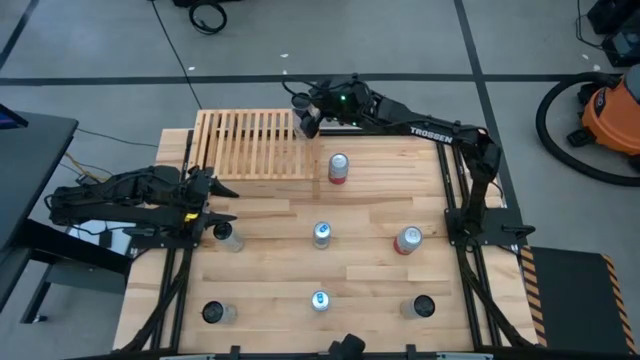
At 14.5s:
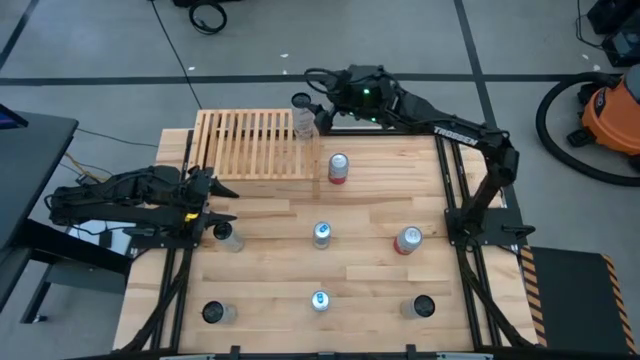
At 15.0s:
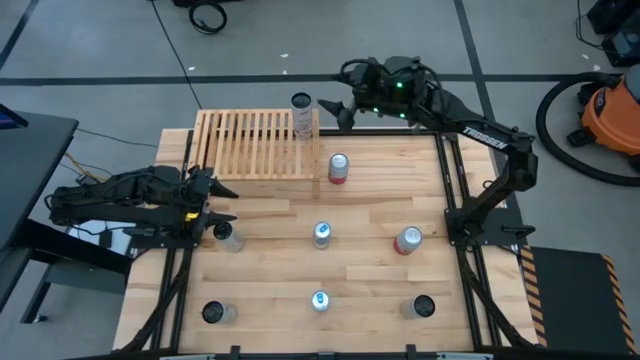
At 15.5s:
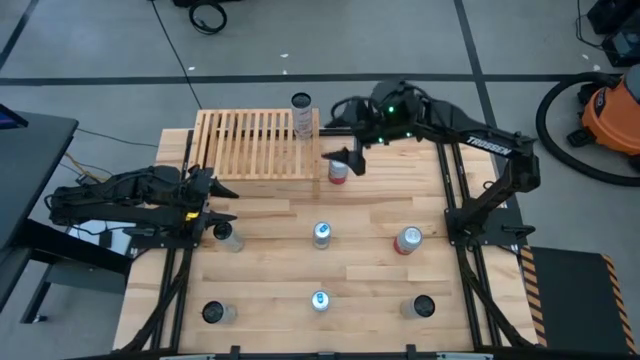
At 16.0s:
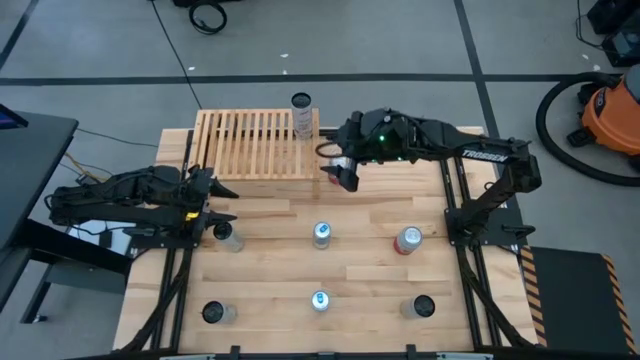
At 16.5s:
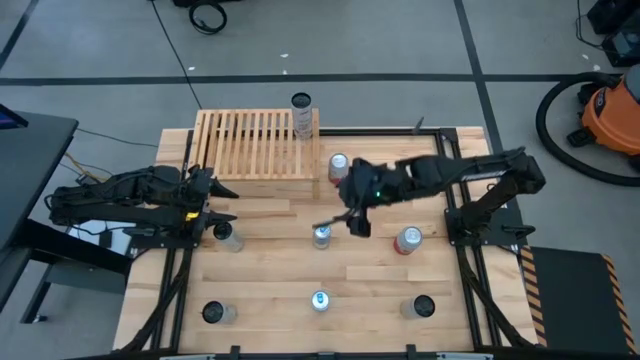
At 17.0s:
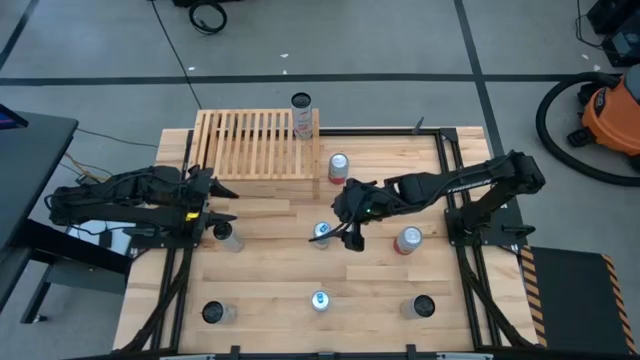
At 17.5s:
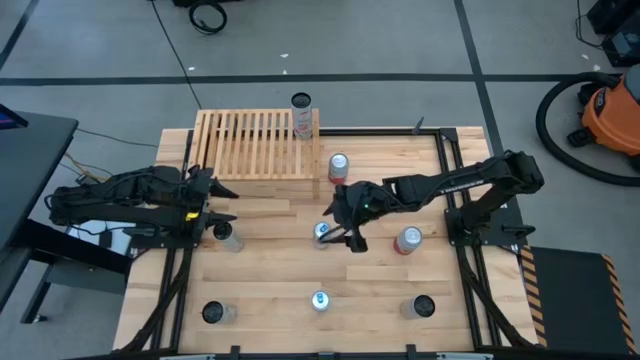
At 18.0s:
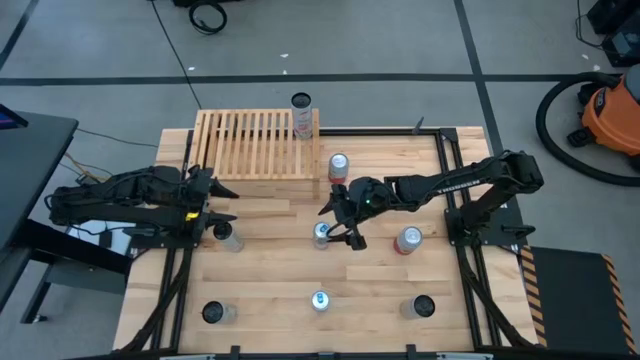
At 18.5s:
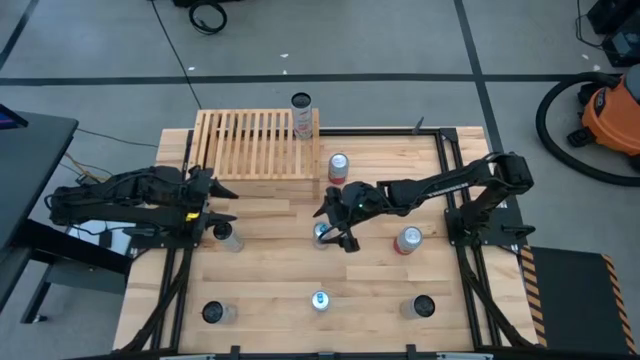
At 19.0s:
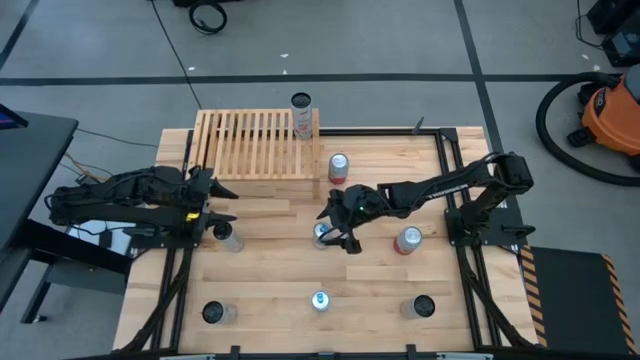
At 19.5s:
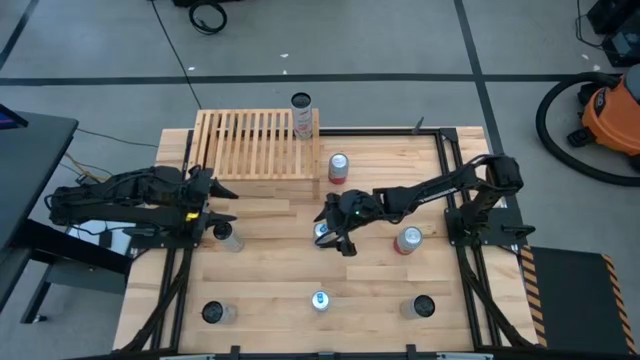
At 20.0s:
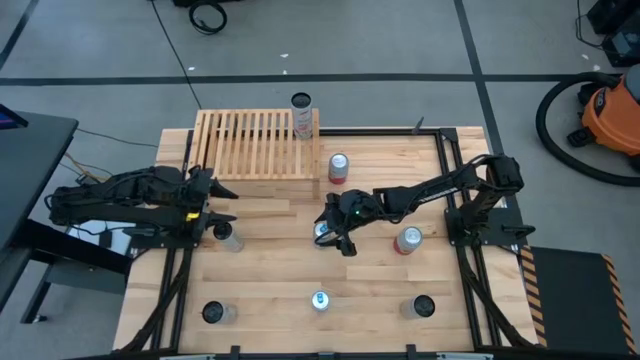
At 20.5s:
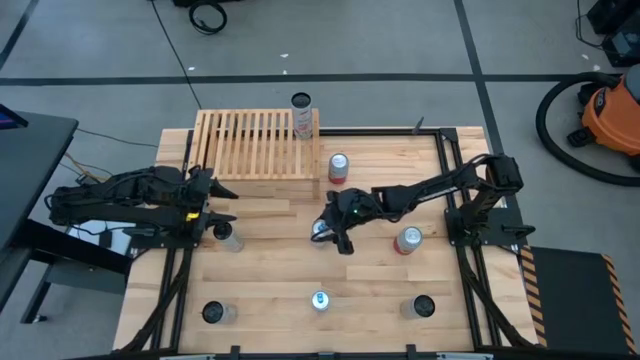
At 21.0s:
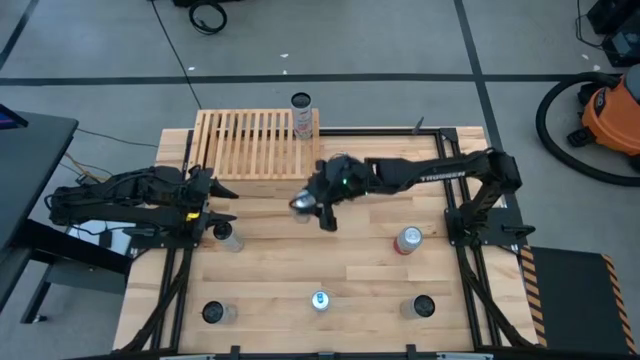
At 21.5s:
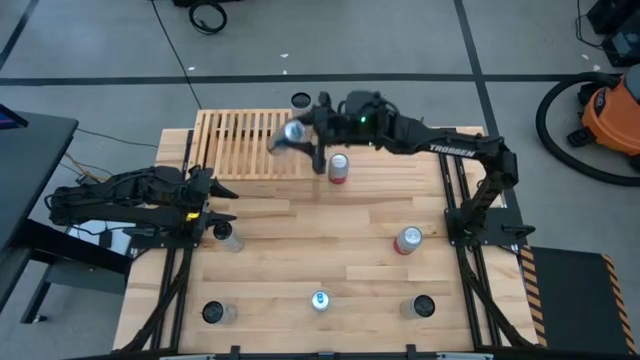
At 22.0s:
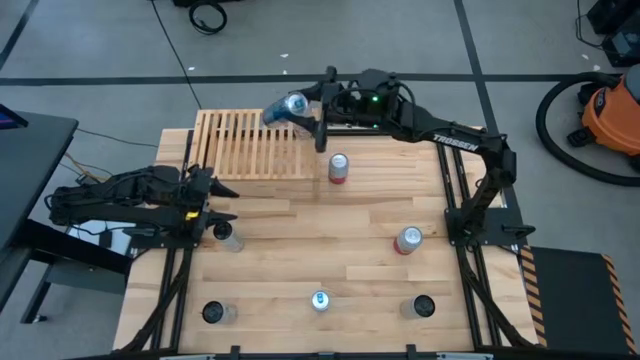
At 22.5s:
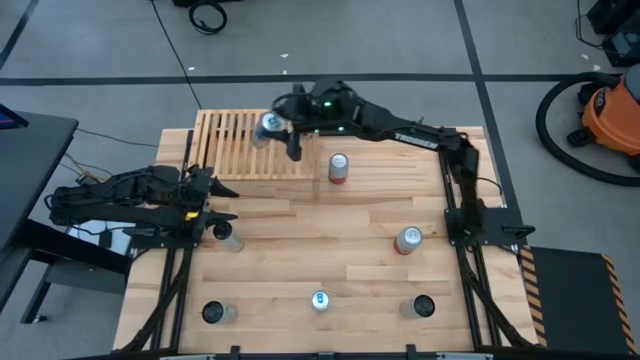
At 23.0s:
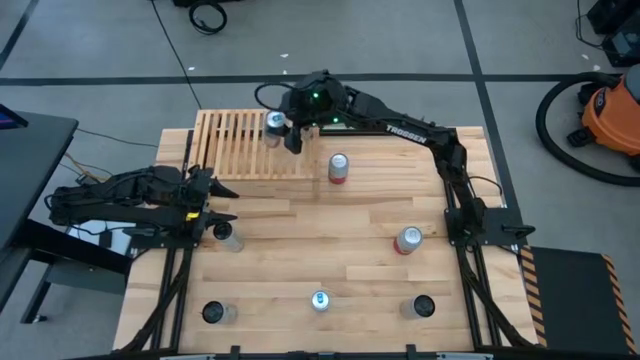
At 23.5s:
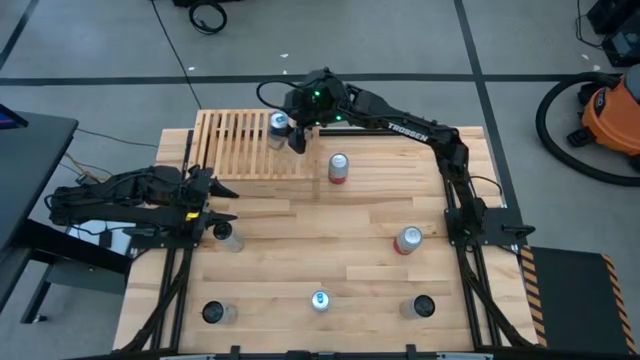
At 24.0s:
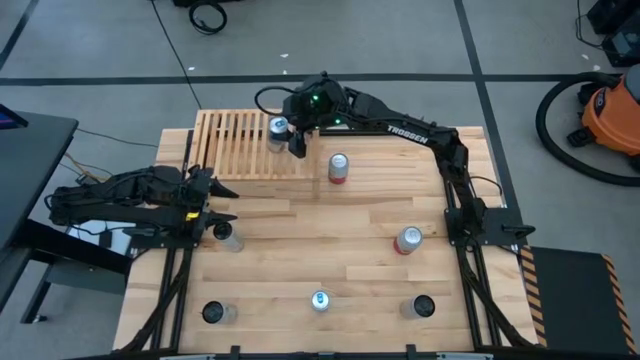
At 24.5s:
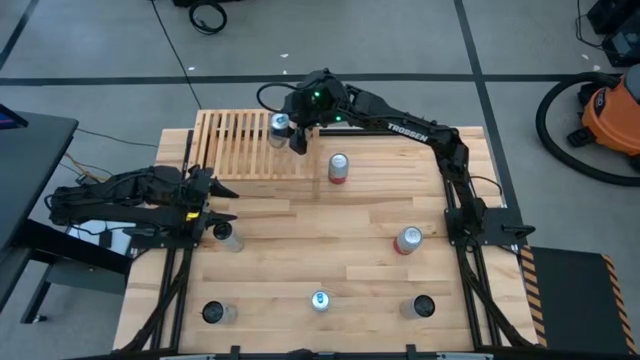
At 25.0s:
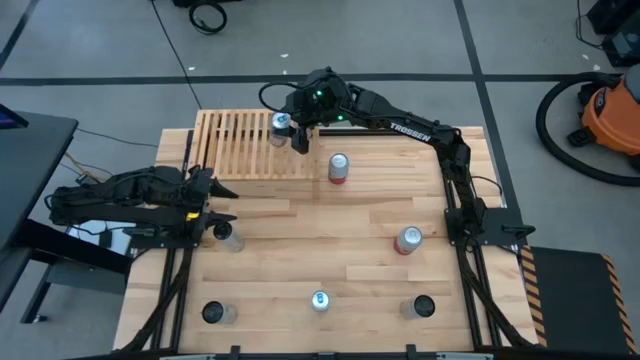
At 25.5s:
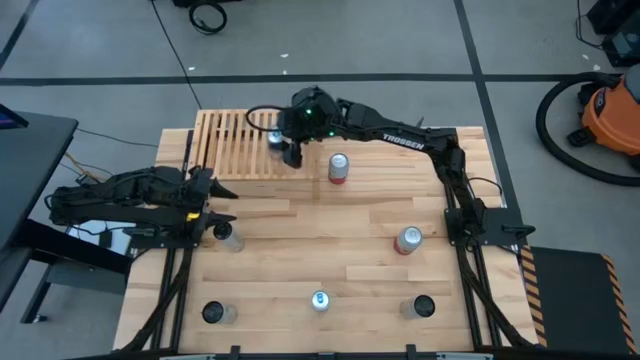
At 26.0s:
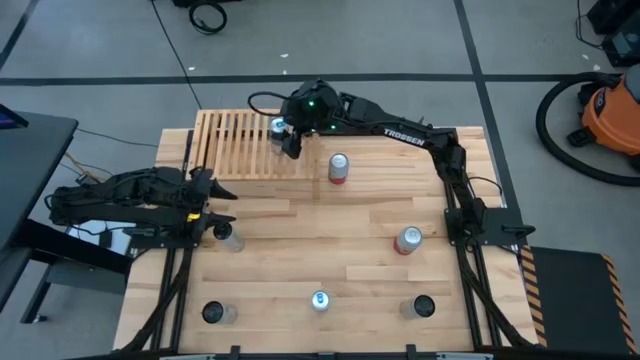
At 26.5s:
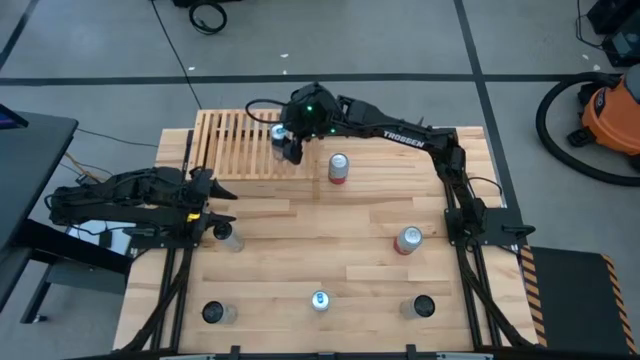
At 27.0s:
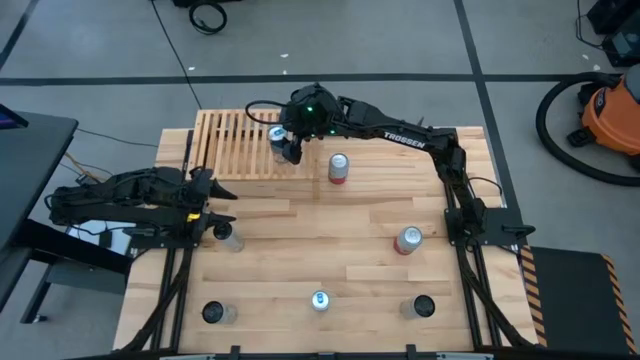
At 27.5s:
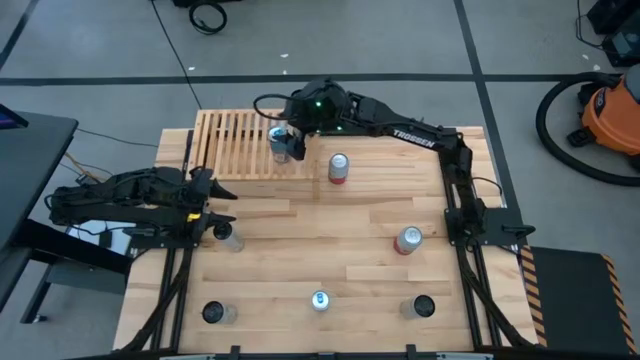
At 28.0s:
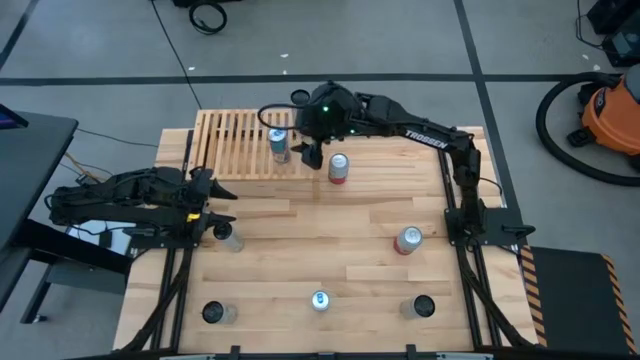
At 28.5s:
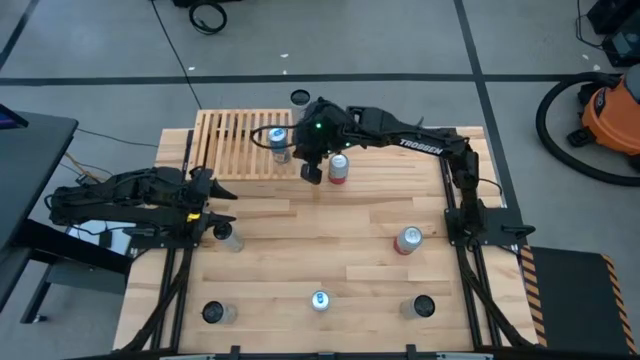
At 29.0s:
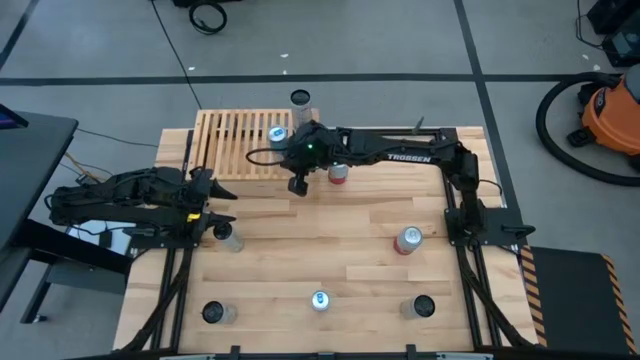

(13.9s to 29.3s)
Task: Place canned beverage on shelf
Put the top blue soda can on the shelf
